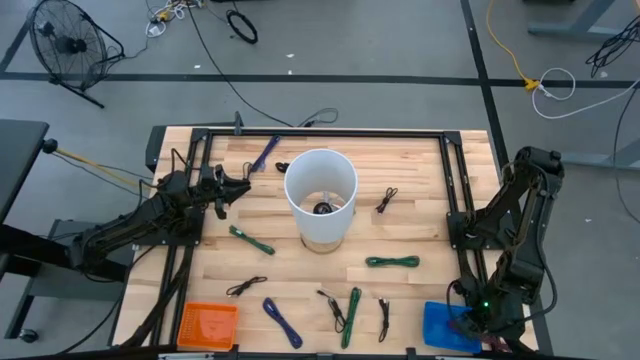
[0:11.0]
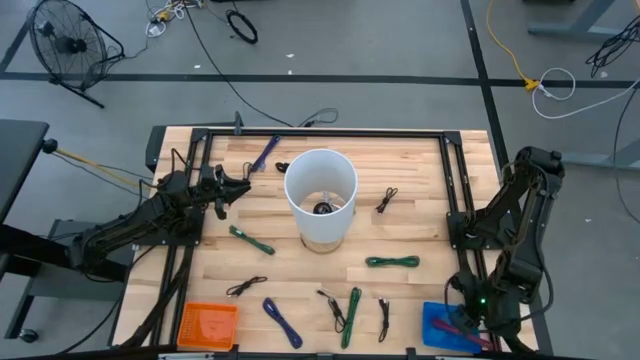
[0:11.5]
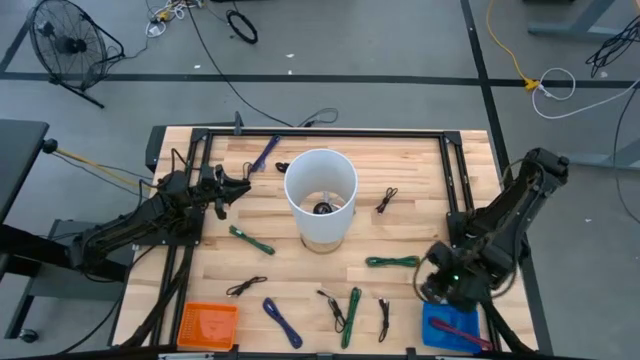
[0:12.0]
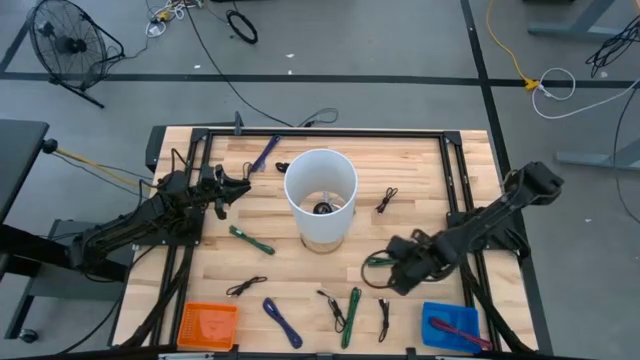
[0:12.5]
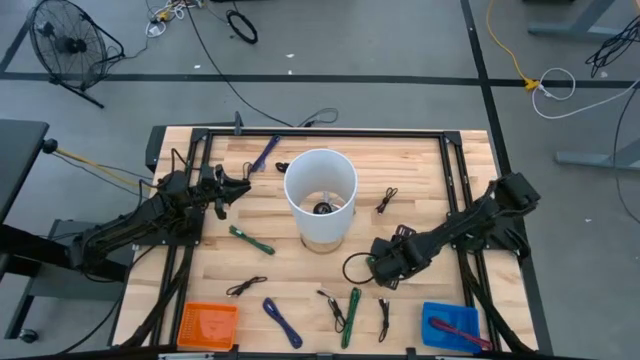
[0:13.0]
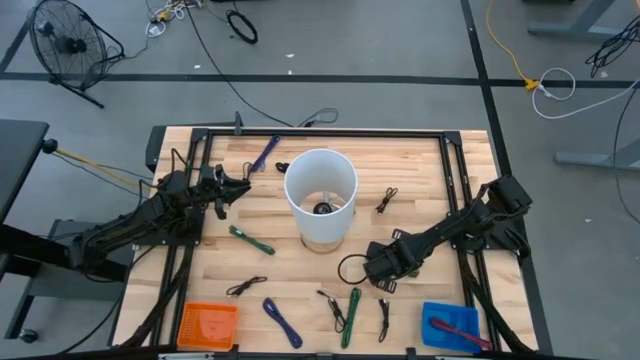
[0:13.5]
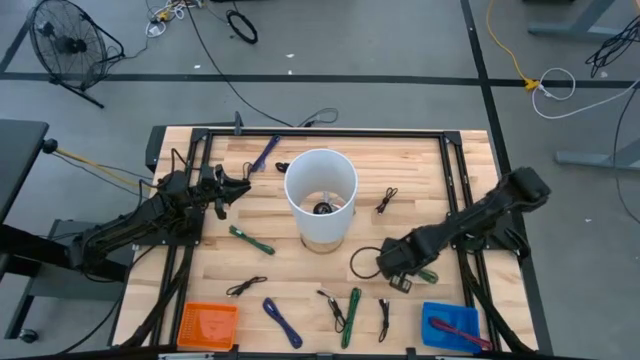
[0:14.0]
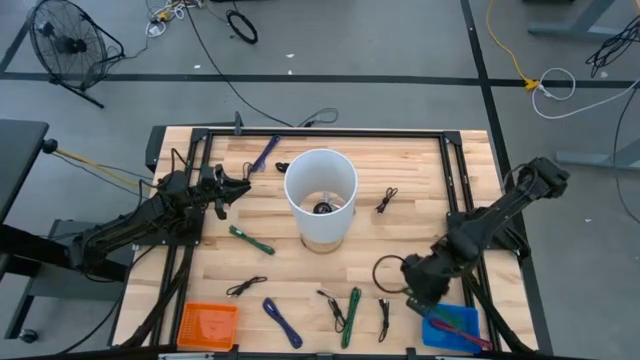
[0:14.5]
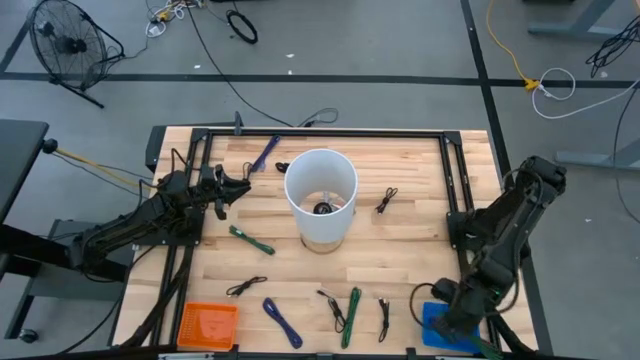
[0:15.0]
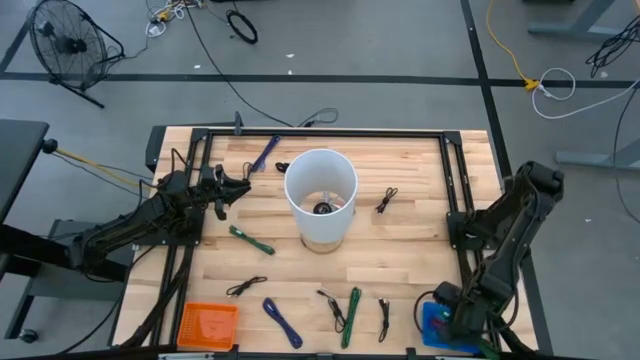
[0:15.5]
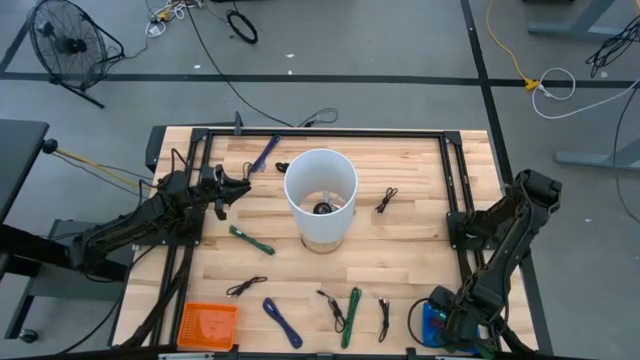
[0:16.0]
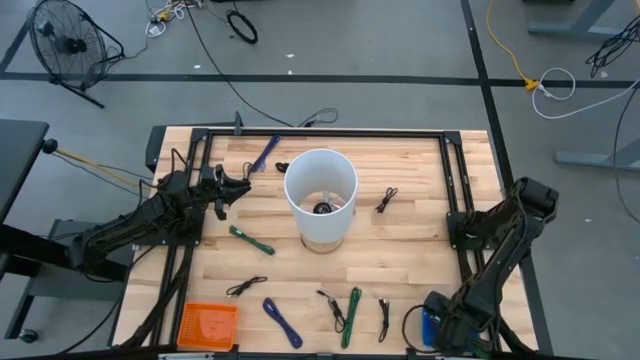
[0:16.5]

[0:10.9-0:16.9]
Task: Pick & Place USB Port
Put the black and green charger cable into the blue bin

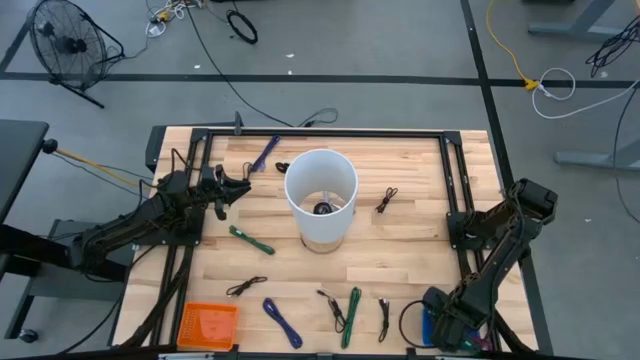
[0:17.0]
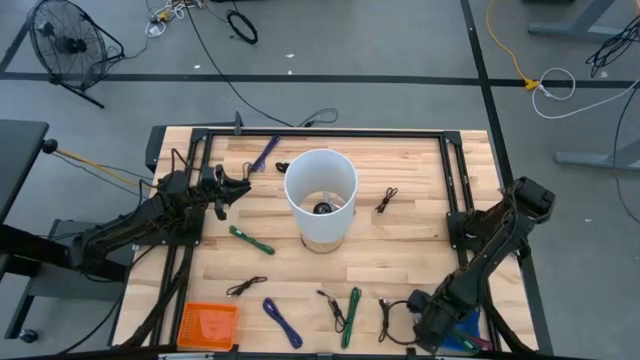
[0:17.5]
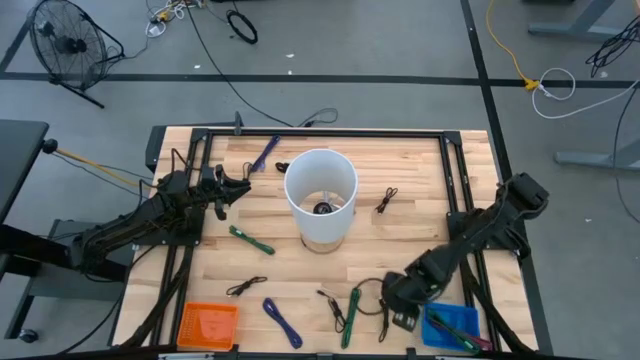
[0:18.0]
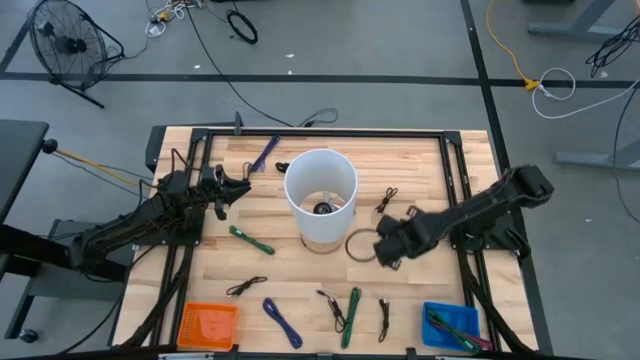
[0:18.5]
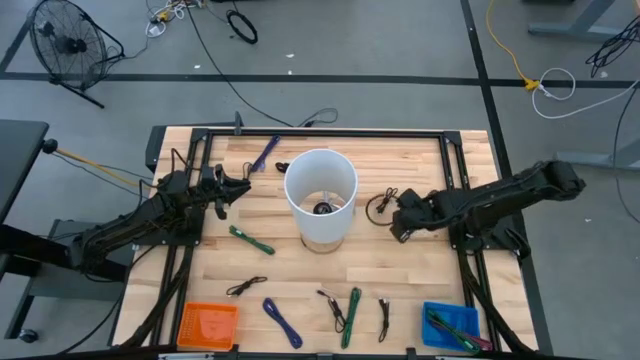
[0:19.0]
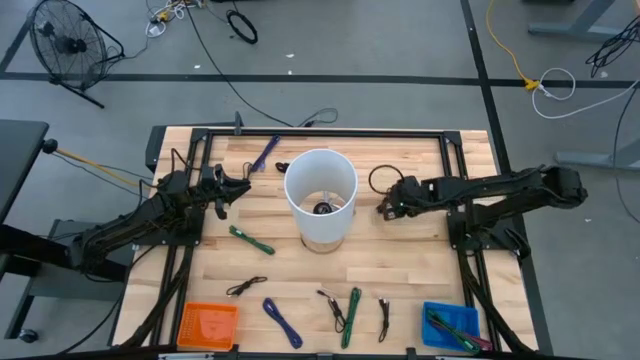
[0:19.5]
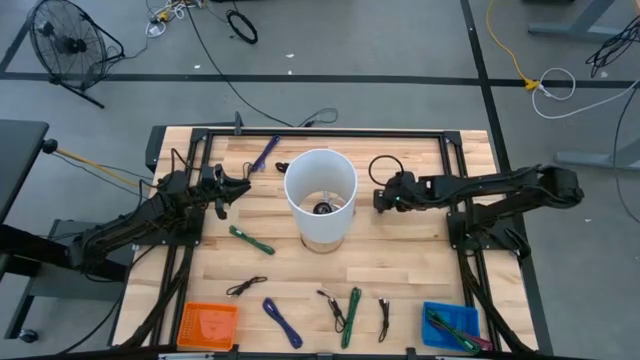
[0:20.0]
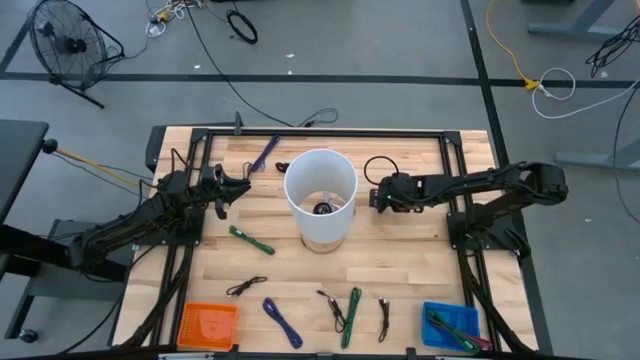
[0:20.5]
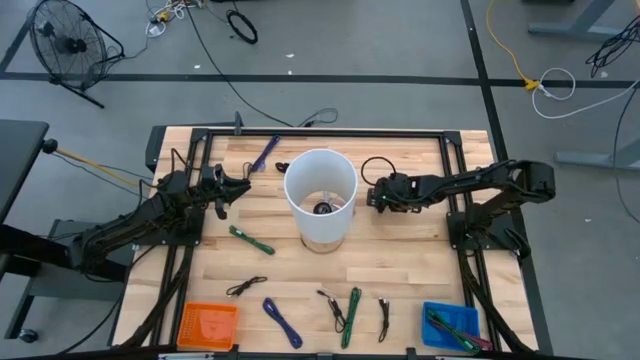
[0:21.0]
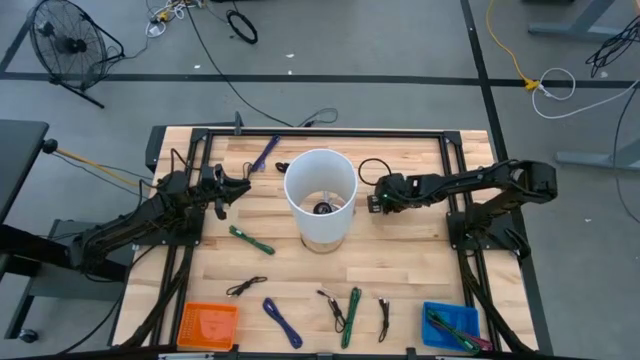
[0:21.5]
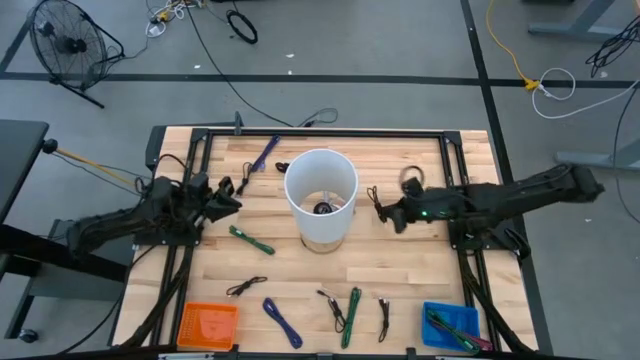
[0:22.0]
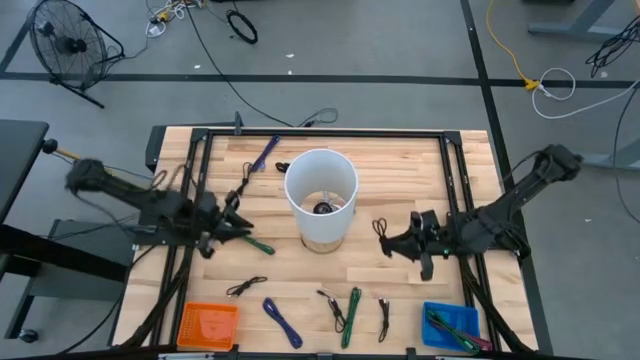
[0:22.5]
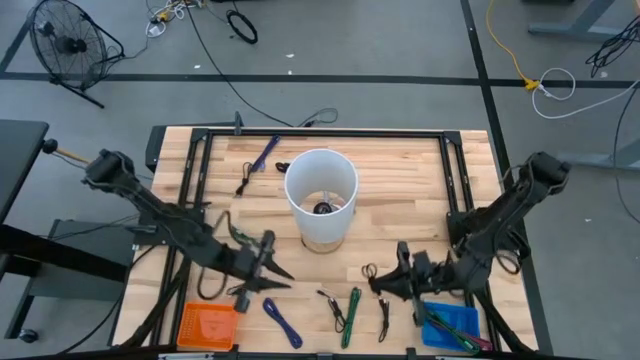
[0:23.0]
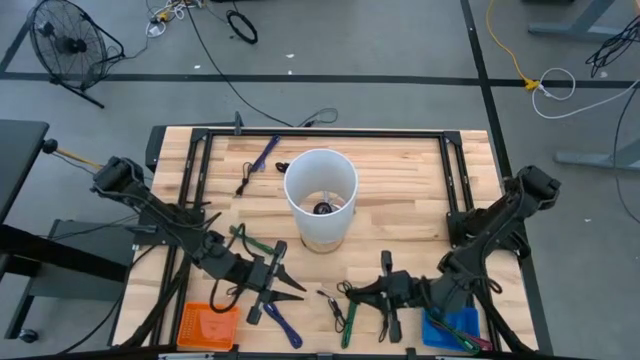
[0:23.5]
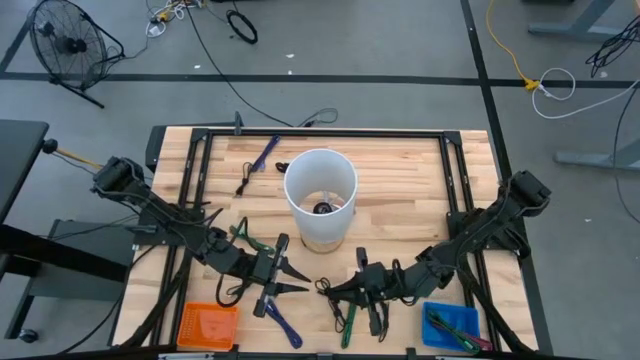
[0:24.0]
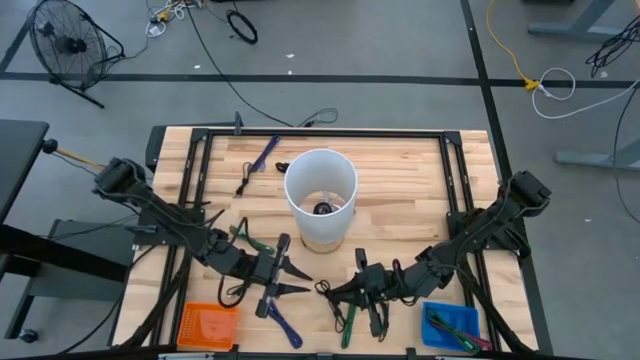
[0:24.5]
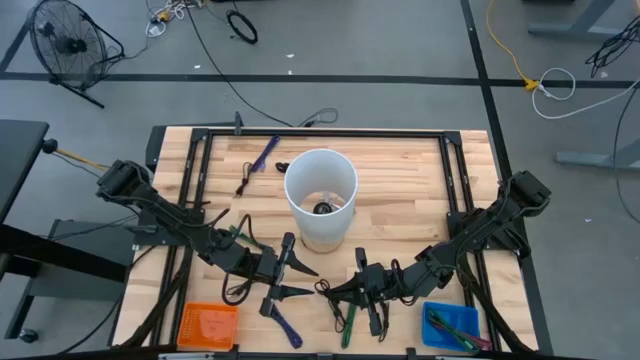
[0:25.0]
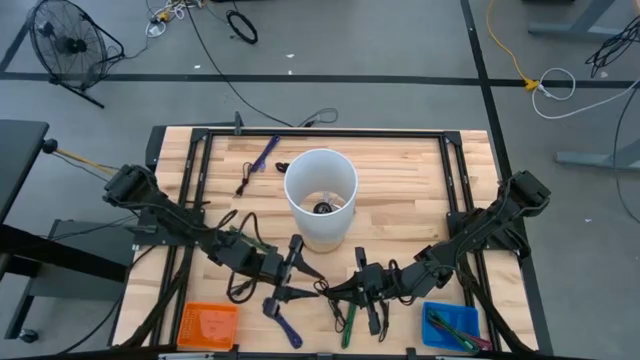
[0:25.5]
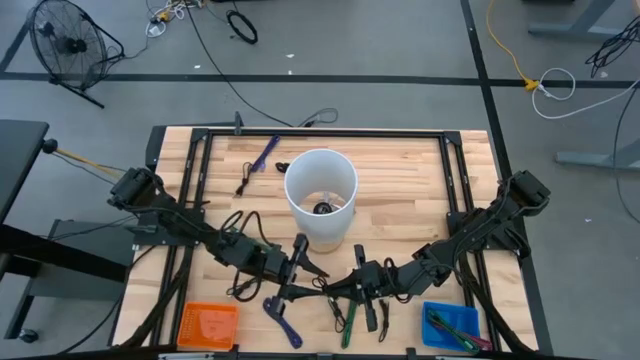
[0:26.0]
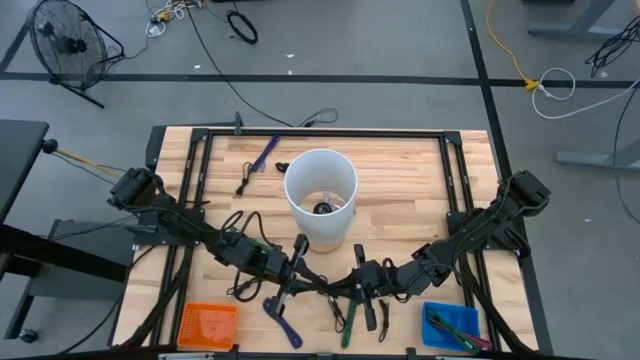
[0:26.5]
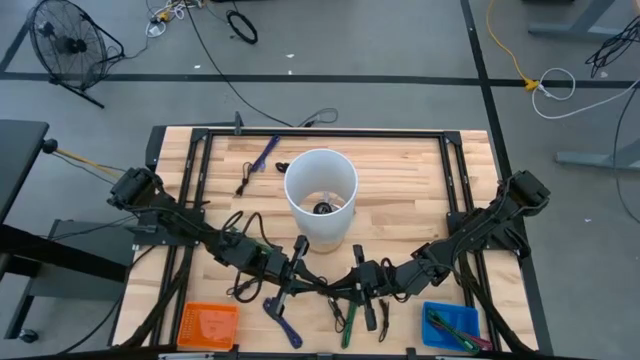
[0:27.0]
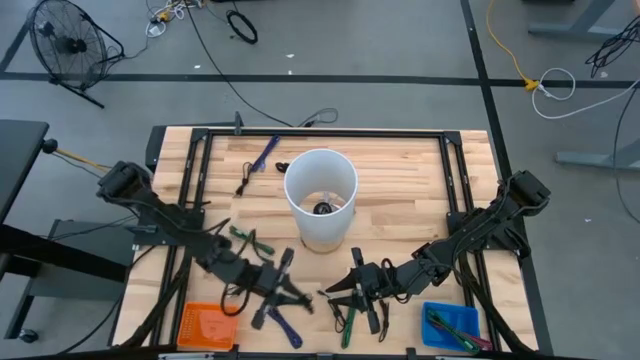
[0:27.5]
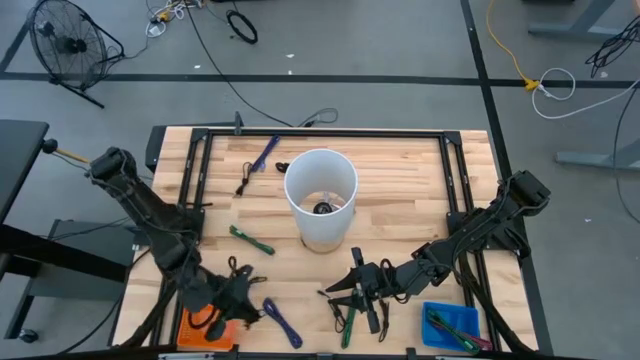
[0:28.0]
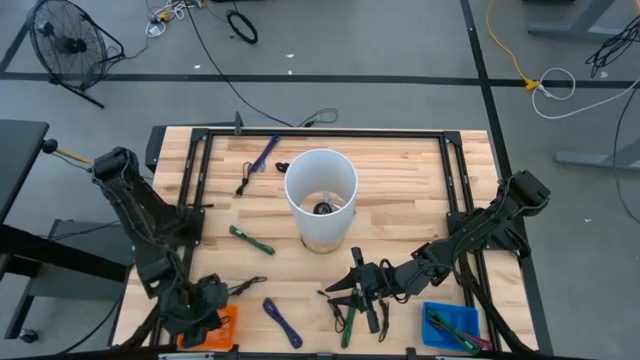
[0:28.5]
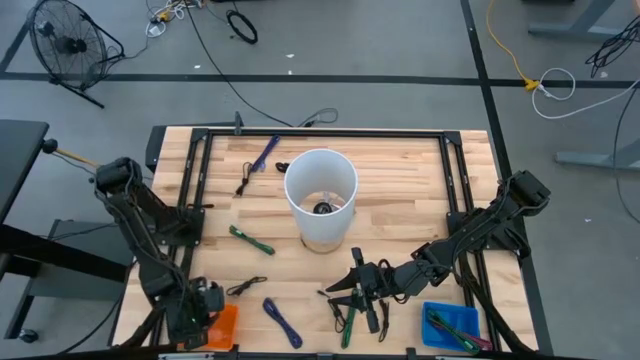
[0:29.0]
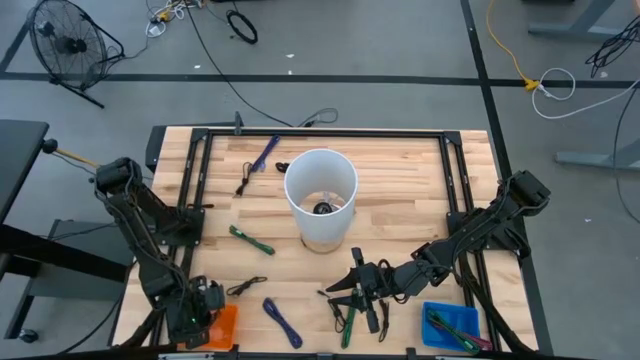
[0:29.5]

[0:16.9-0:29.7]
Put the black charger cable into the orange bin

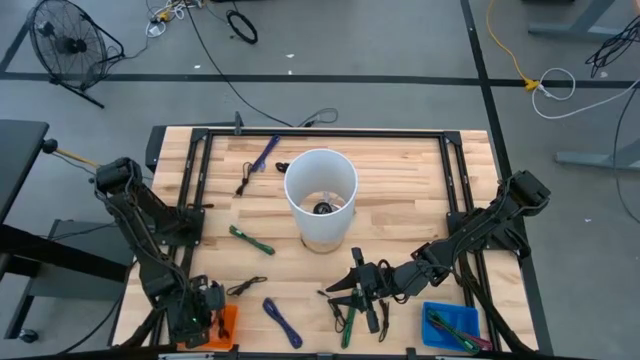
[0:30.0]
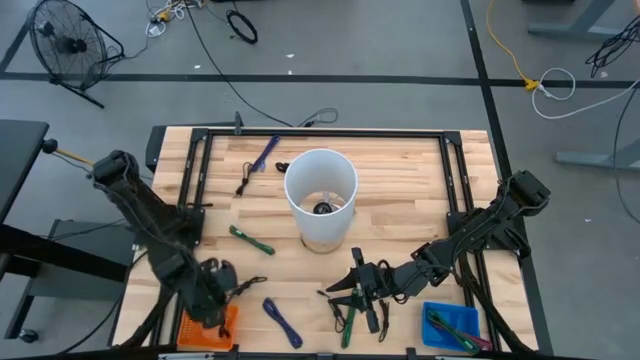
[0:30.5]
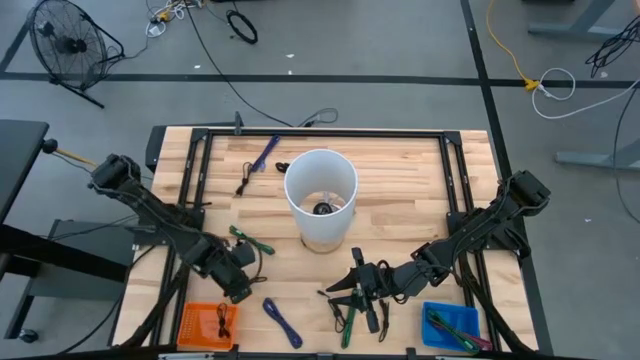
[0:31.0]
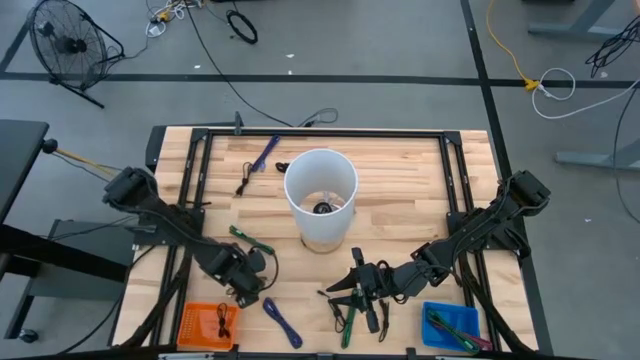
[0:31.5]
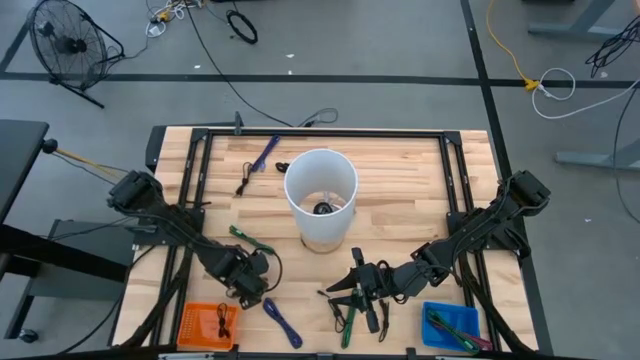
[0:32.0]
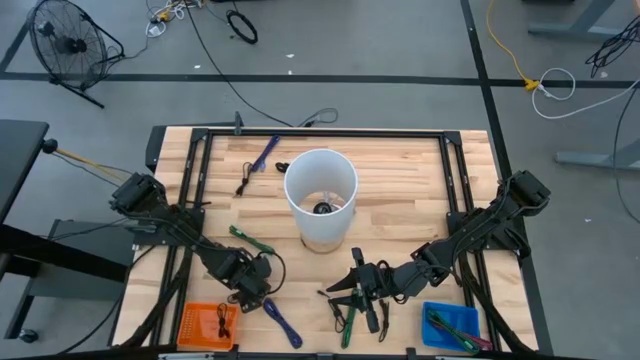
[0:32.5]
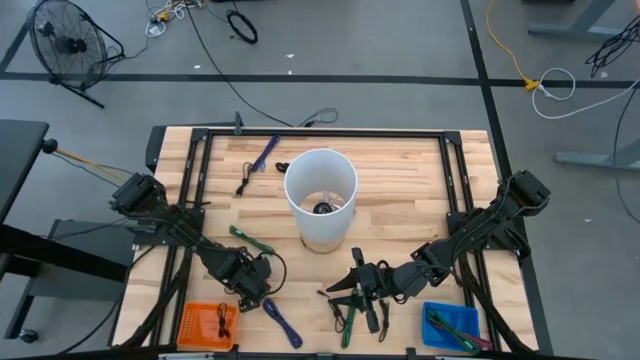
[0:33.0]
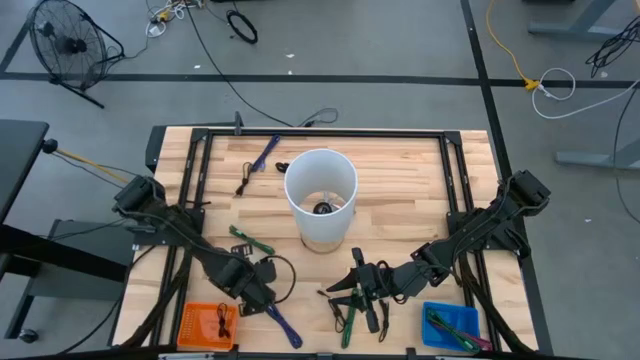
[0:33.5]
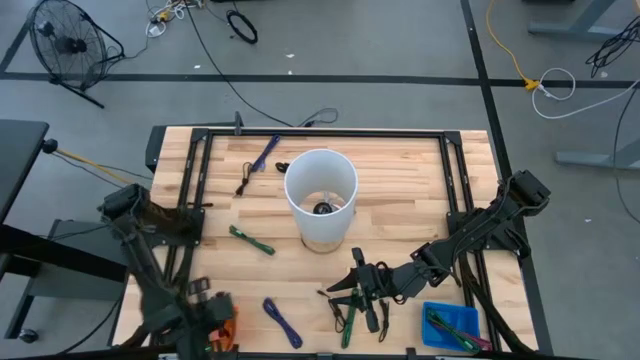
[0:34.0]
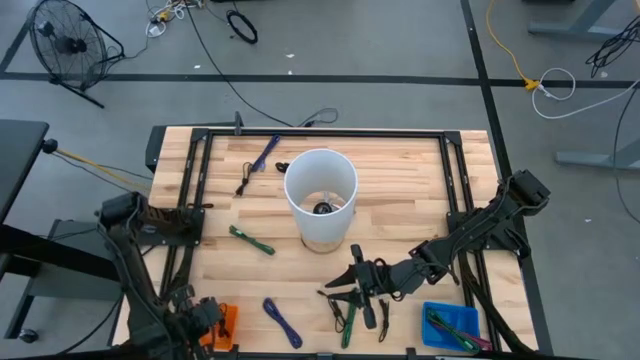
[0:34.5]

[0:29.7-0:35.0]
Put the black charger cable into the orange bin
